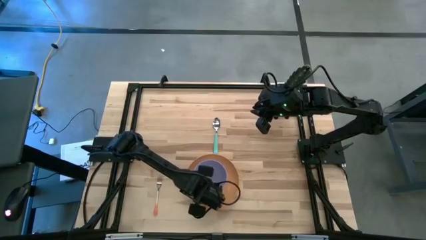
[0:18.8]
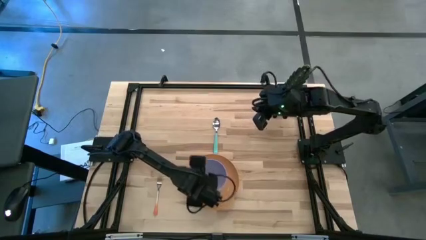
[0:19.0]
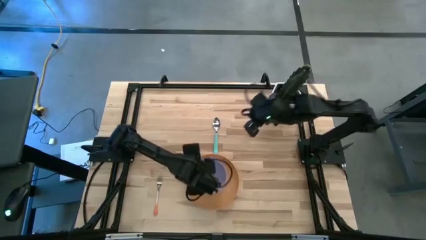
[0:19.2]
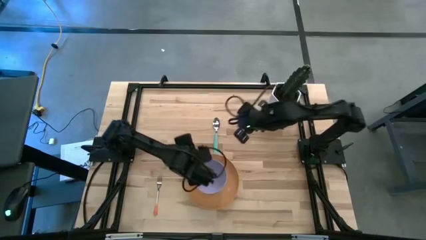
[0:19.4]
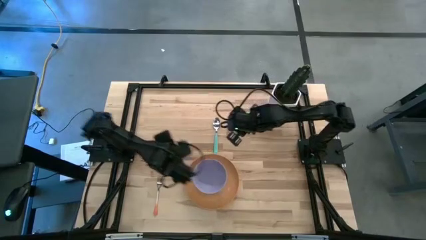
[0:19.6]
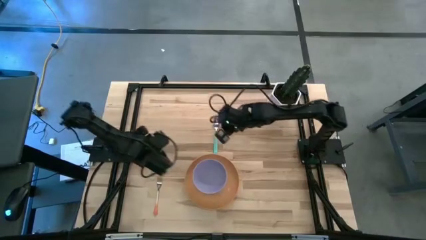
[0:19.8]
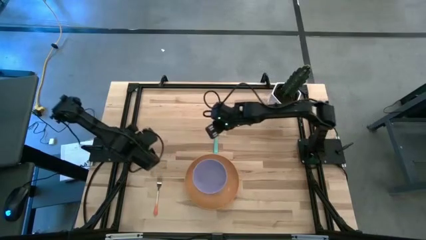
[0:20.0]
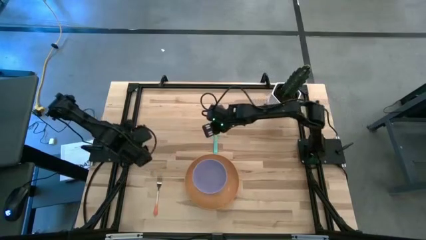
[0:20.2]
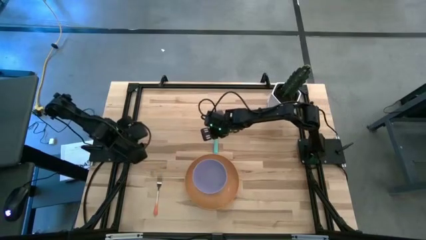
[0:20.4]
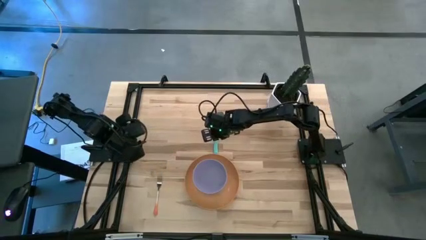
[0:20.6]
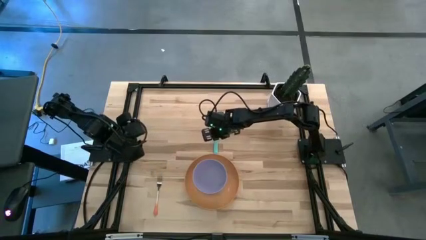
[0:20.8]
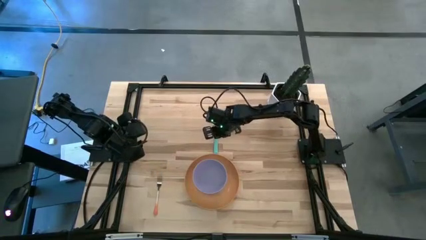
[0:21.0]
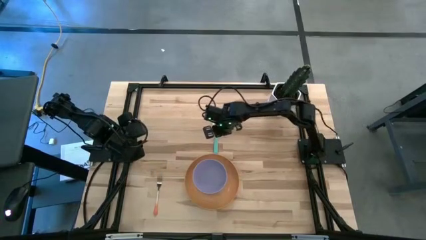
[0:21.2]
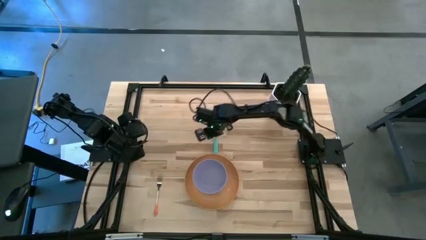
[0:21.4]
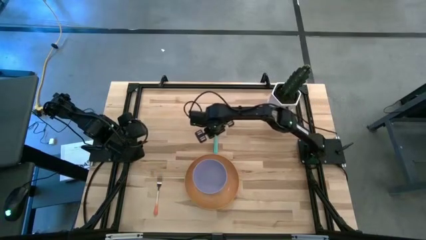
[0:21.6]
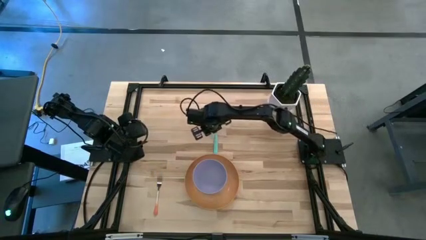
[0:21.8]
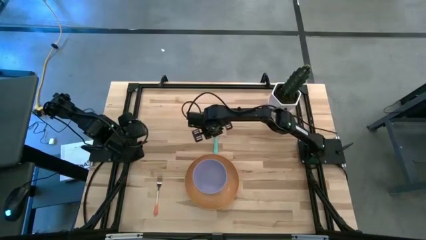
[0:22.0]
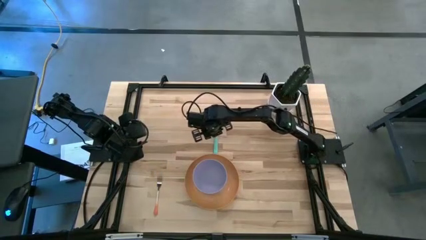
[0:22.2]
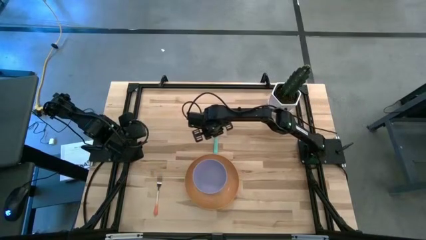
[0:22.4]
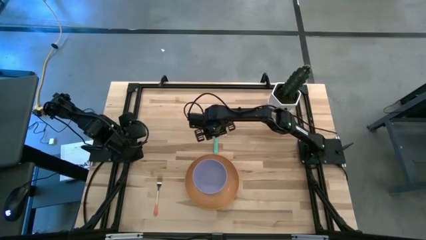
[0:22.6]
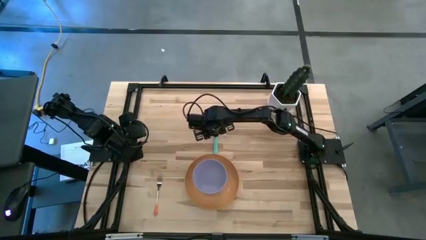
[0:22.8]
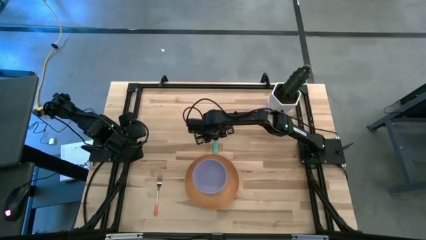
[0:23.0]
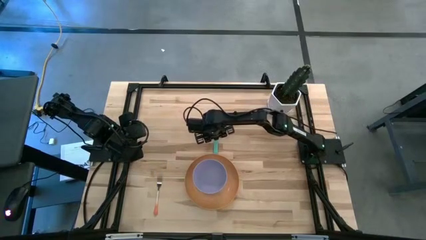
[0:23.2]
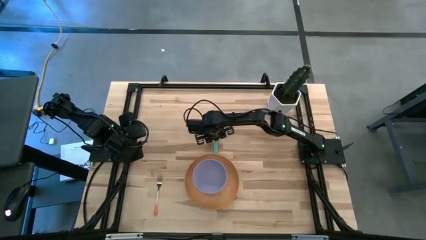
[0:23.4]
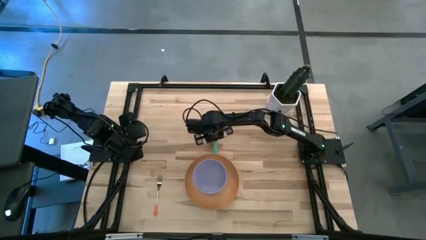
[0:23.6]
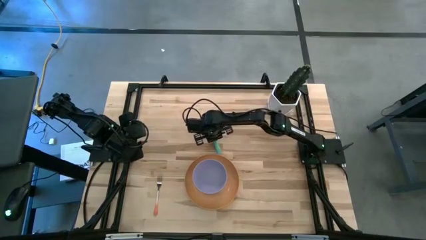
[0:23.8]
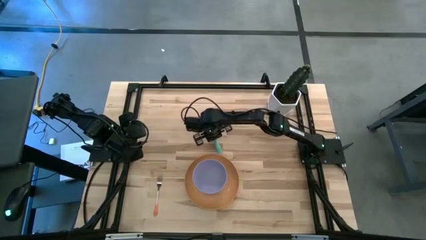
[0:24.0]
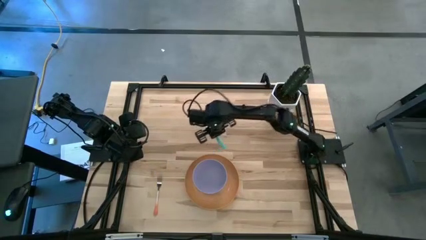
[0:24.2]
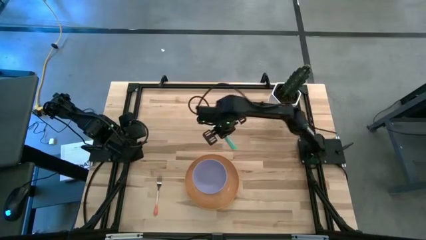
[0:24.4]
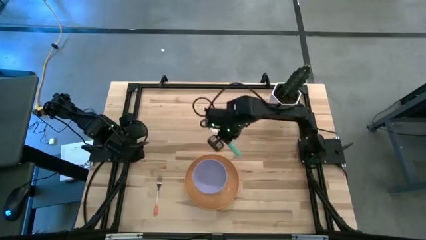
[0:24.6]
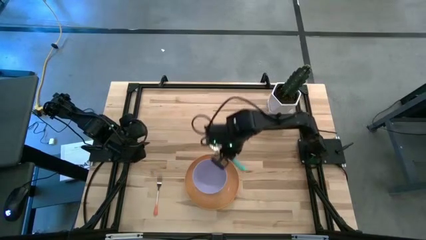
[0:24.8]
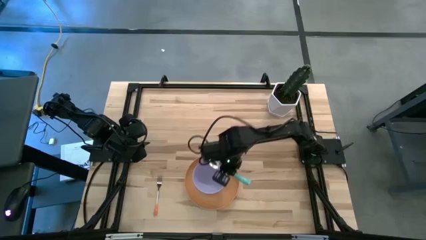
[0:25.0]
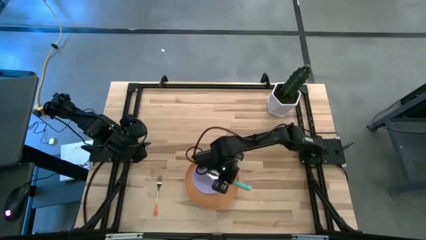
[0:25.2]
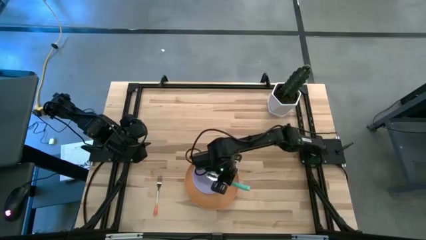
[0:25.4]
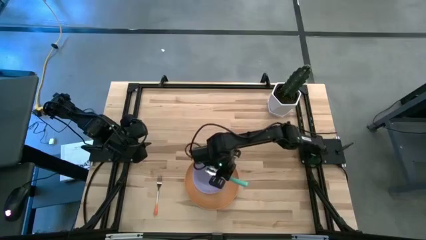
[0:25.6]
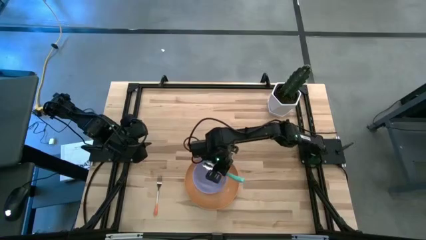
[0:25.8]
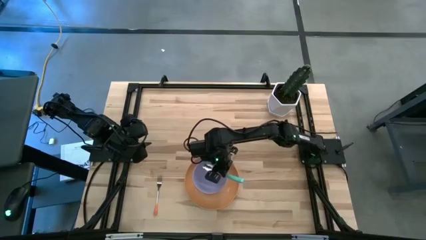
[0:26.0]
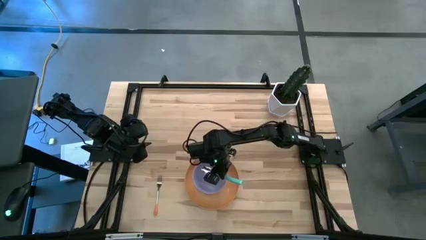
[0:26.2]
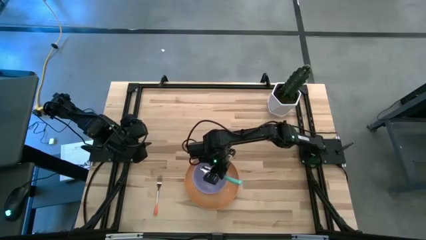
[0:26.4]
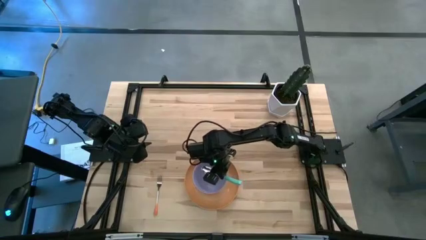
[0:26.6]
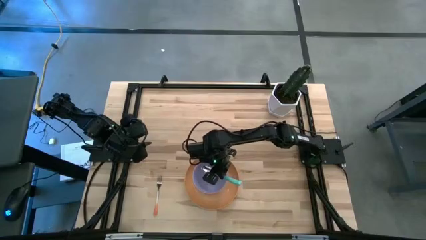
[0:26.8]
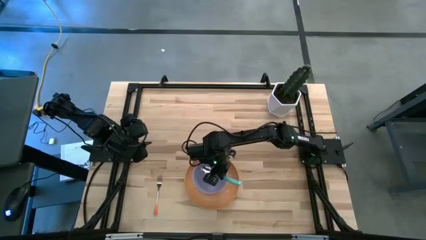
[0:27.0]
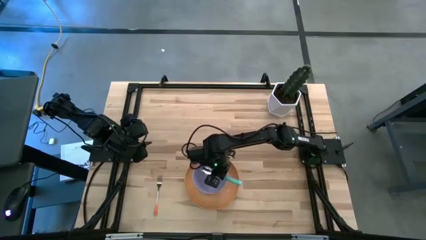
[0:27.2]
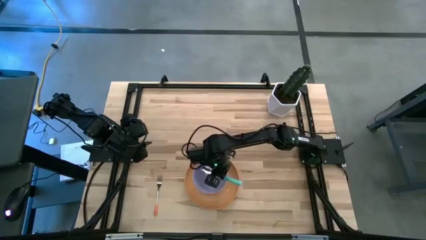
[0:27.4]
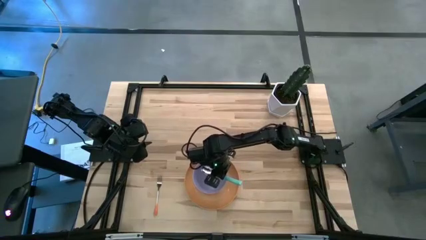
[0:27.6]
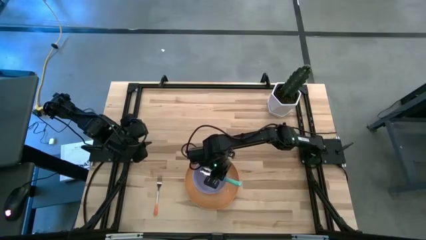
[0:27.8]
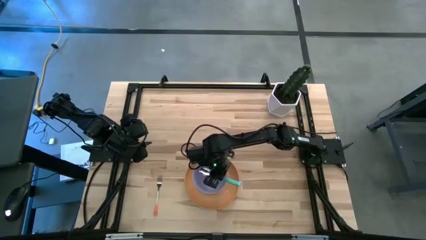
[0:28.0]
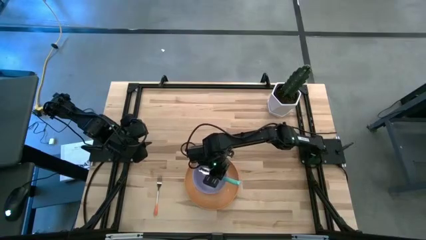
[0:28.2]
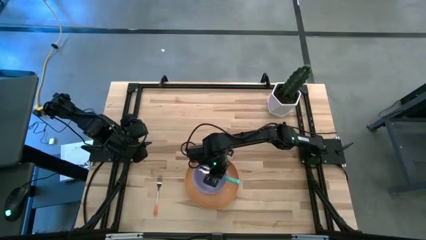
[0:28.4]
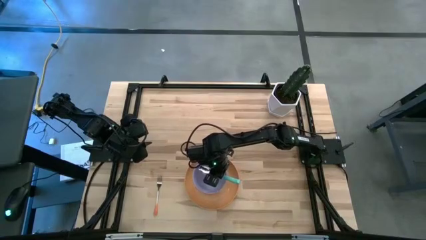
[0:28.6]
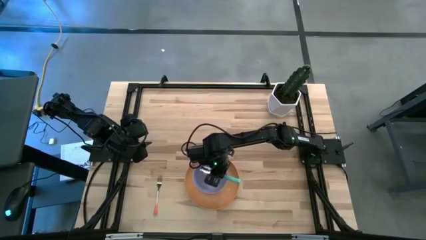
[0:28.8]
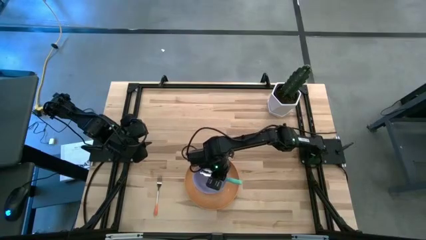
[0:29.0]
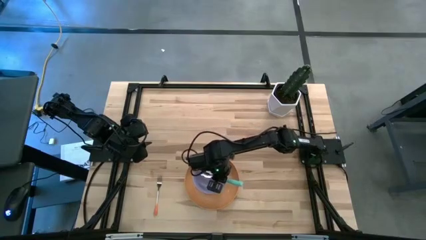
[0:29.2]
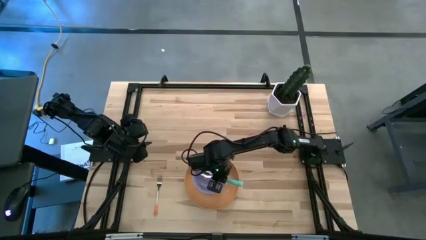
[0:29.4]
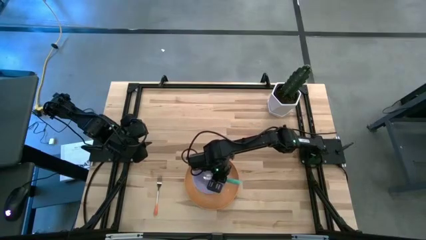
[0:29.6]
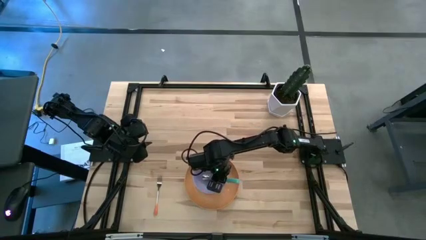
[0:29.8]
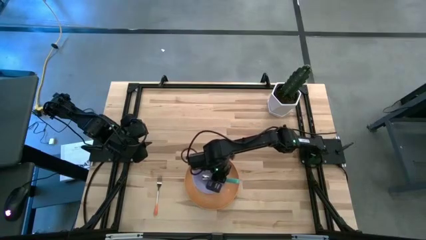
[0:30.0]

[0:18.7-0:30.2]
Task: Set table place
Put the green spoon into the purple bowl

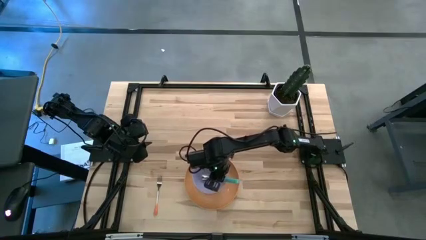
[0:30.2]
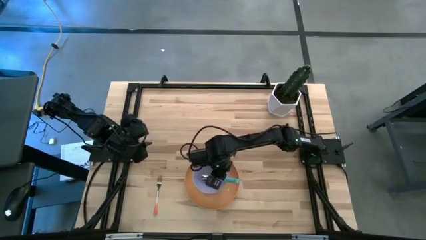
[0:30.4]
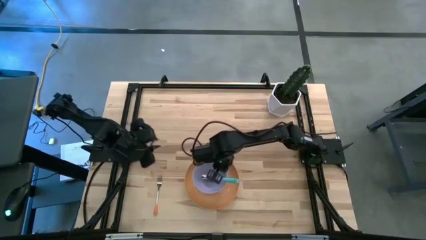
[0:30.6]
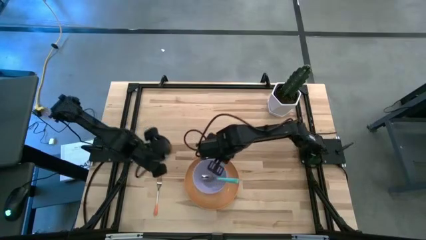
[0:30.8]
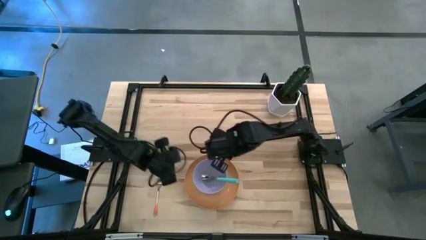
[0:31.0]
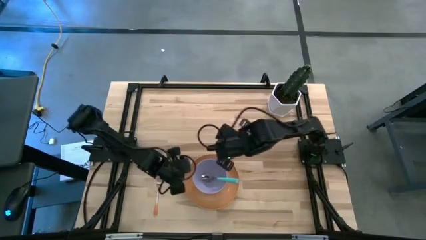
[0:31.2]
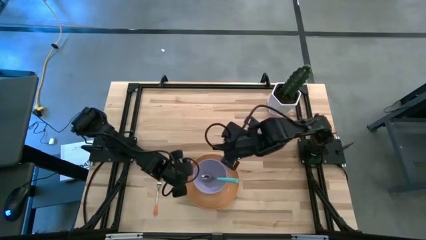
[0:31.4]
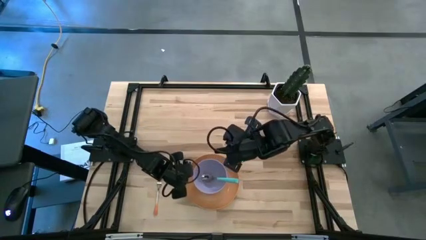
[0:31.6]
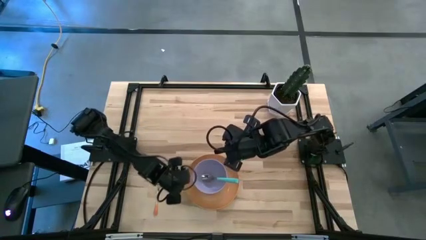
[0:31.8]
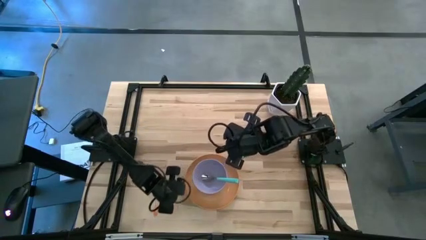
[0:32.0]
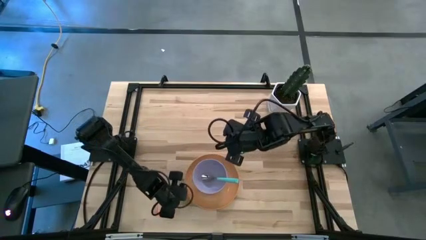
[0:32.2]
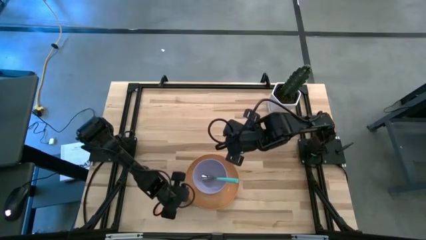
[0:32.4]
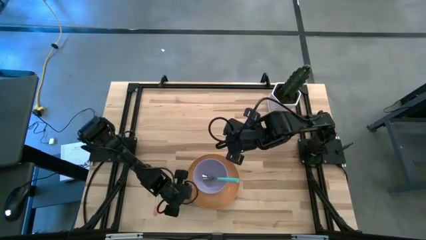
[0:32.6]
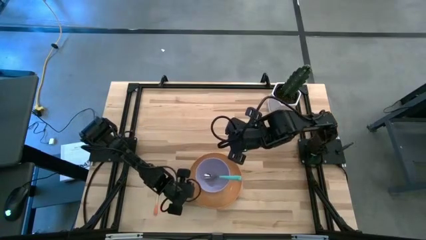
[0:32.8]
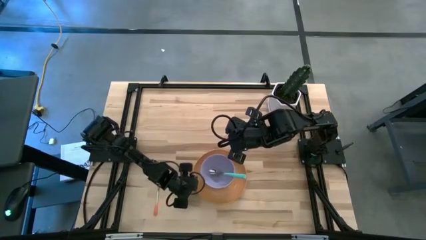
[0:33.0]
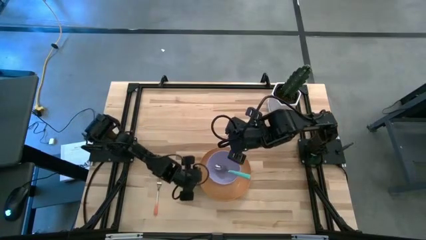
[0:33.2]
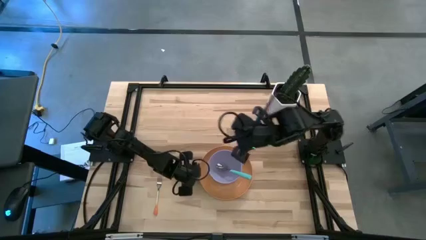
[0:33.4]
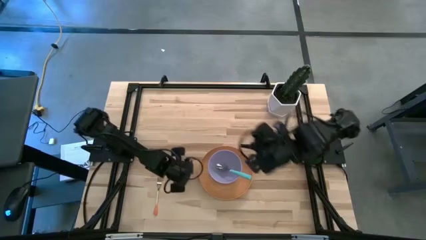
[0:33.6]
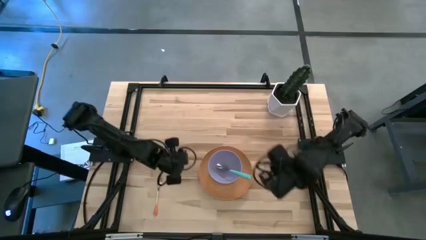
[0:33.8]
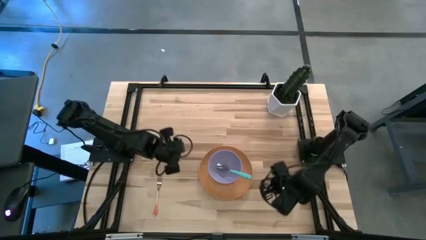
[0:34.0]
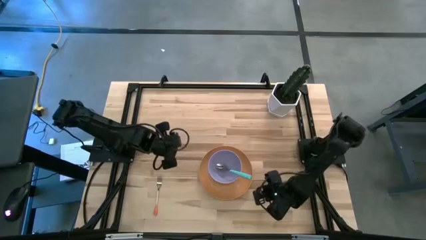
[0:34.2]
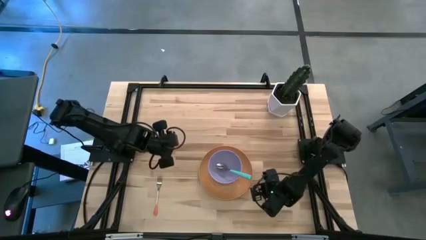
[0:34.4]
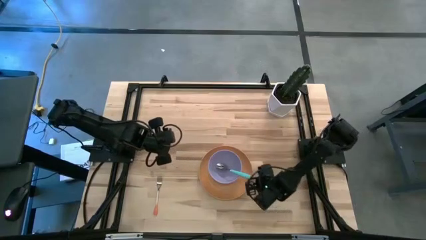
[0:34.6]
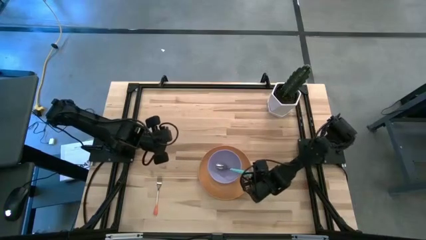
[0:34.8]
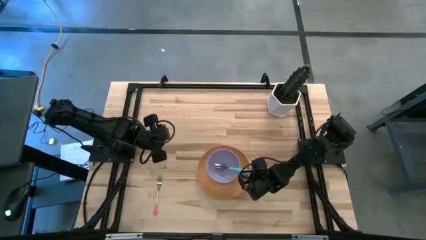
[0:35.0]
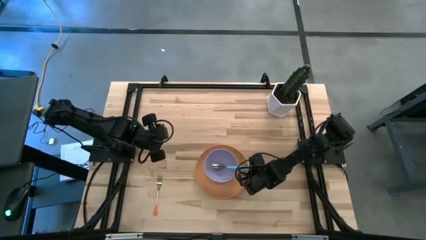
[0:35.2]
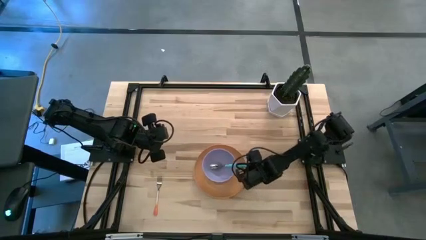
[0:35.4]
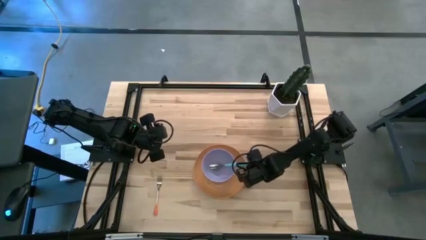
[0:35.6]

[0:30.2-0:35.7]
Adjust the orange plate
